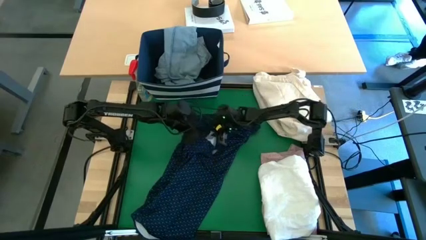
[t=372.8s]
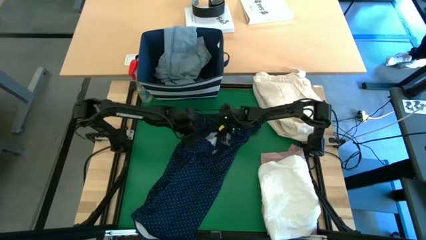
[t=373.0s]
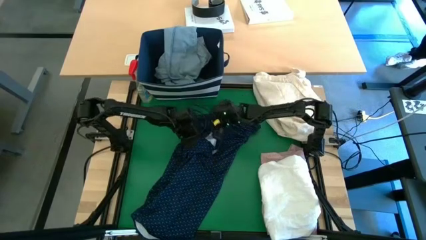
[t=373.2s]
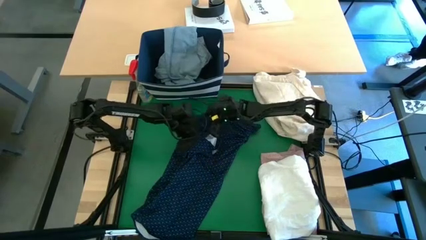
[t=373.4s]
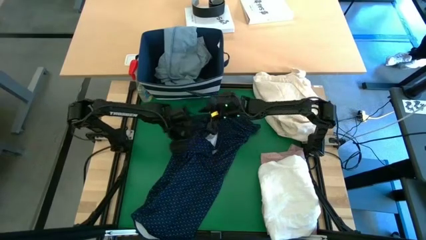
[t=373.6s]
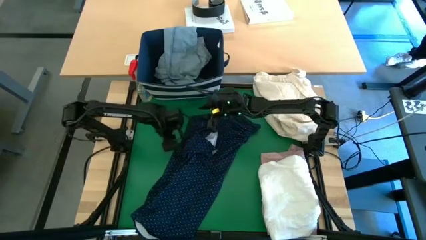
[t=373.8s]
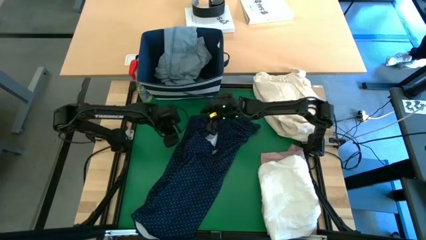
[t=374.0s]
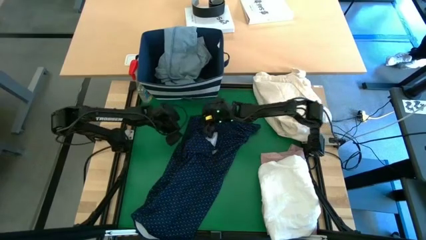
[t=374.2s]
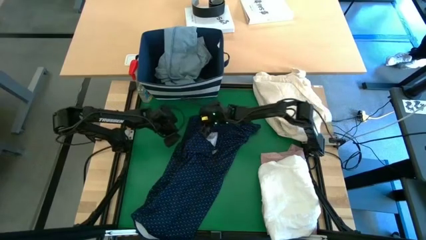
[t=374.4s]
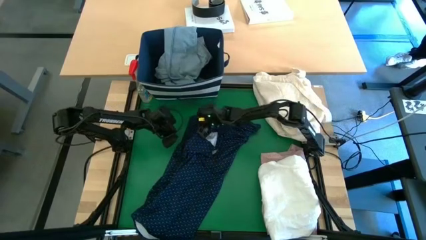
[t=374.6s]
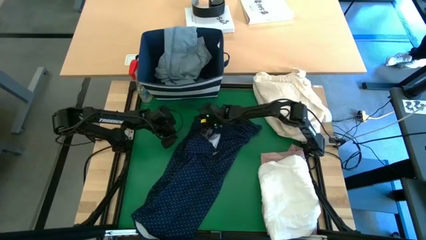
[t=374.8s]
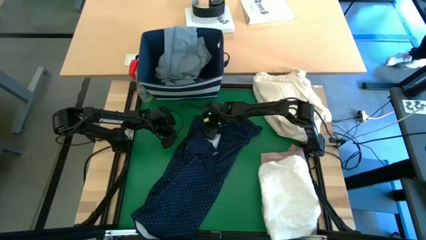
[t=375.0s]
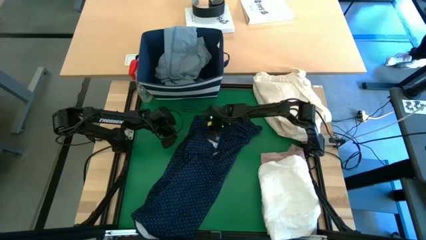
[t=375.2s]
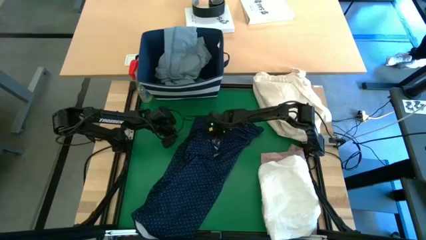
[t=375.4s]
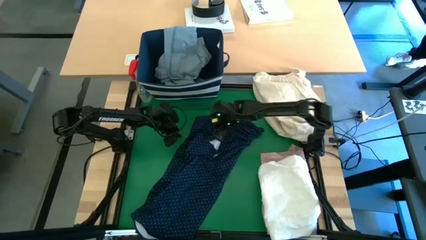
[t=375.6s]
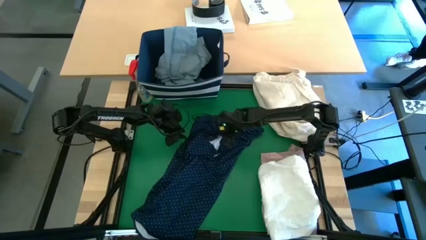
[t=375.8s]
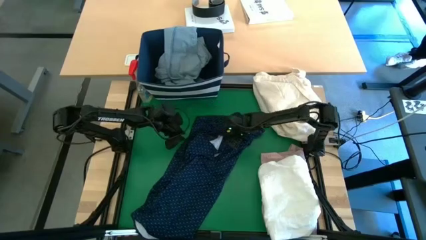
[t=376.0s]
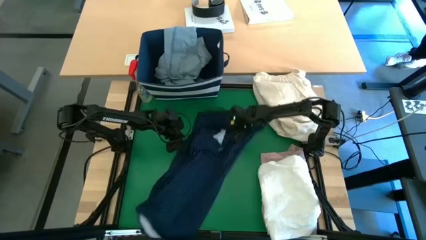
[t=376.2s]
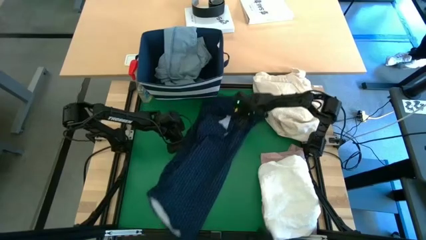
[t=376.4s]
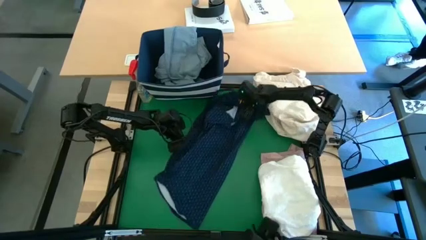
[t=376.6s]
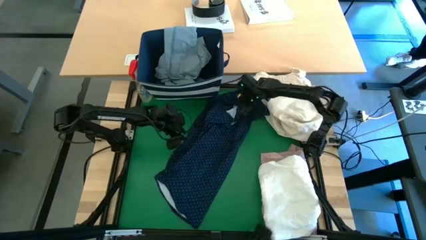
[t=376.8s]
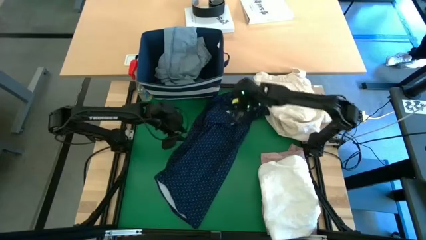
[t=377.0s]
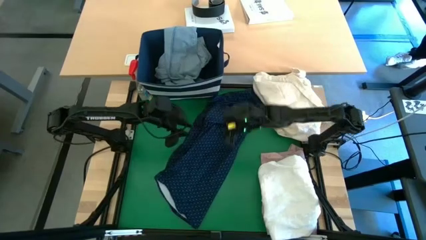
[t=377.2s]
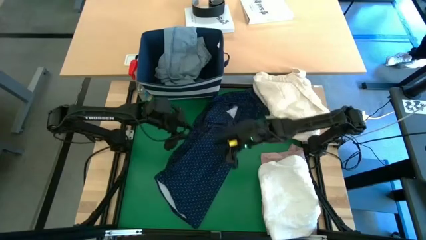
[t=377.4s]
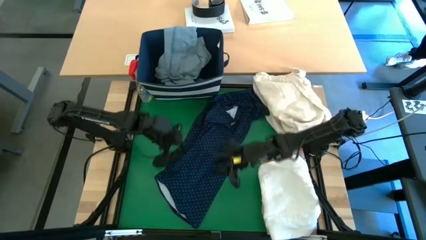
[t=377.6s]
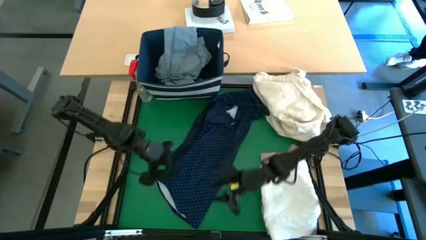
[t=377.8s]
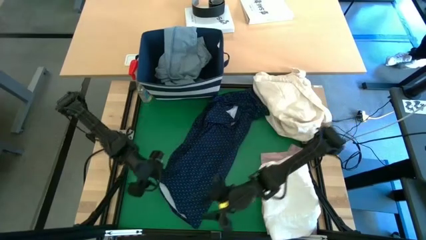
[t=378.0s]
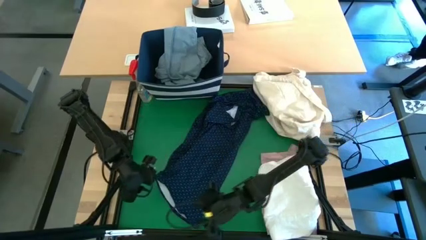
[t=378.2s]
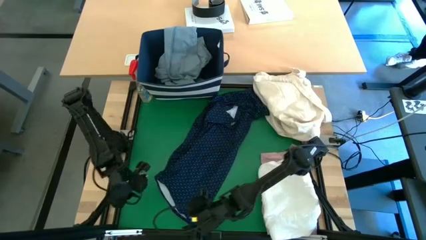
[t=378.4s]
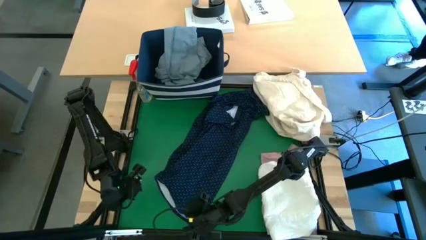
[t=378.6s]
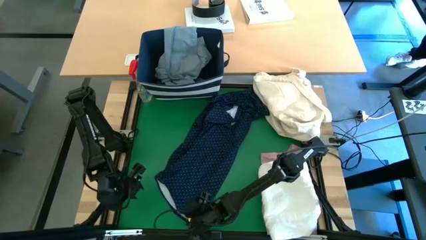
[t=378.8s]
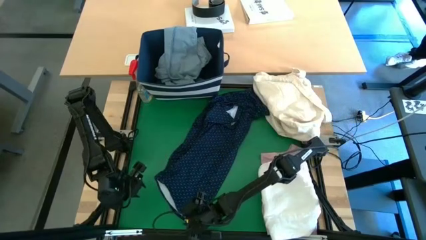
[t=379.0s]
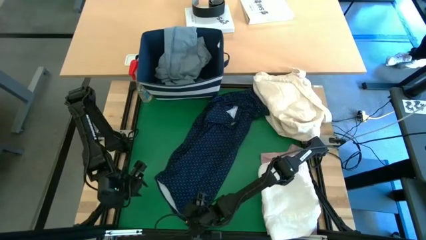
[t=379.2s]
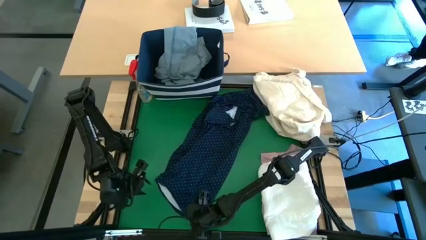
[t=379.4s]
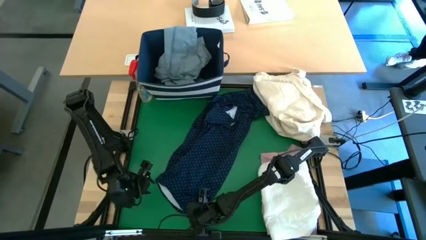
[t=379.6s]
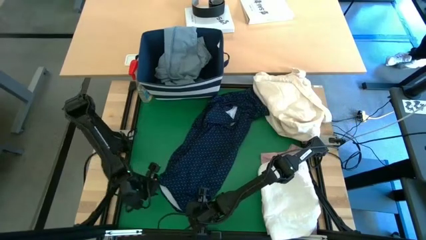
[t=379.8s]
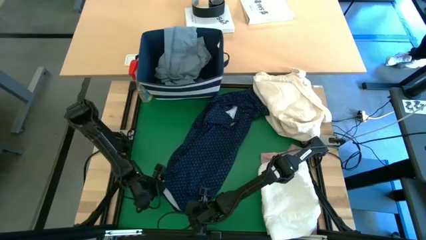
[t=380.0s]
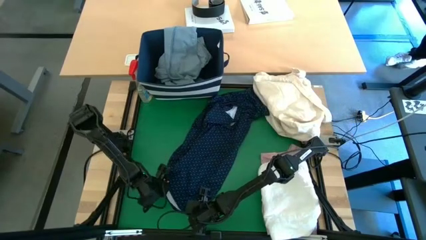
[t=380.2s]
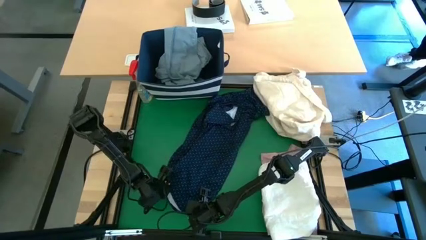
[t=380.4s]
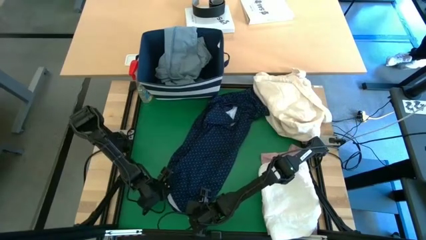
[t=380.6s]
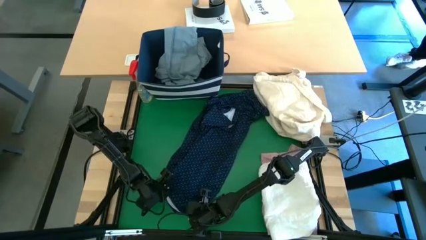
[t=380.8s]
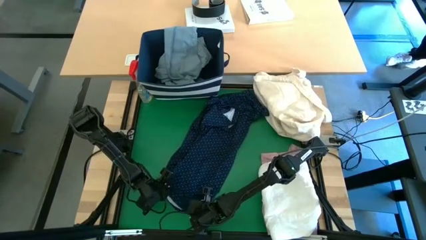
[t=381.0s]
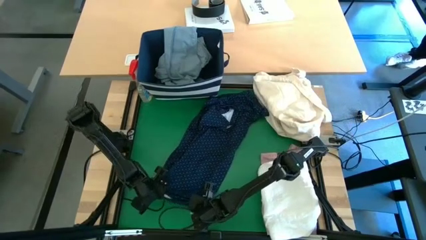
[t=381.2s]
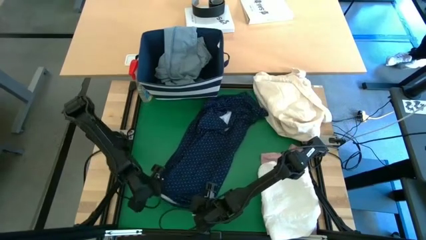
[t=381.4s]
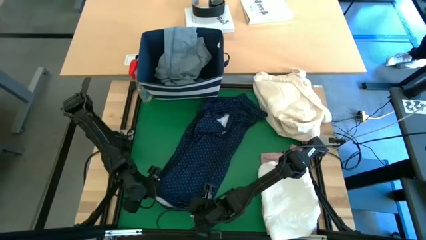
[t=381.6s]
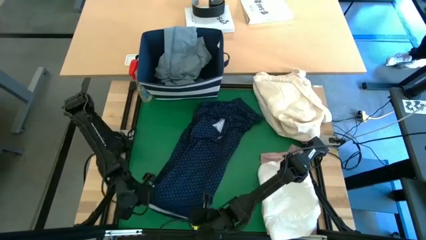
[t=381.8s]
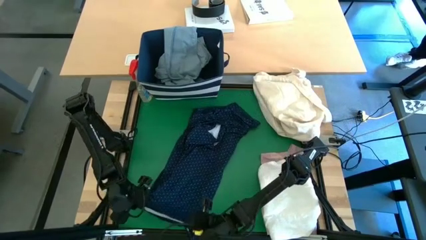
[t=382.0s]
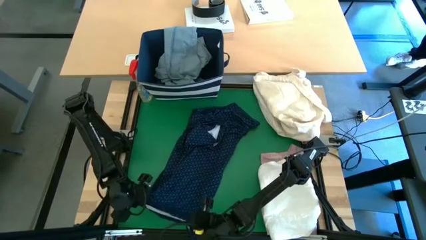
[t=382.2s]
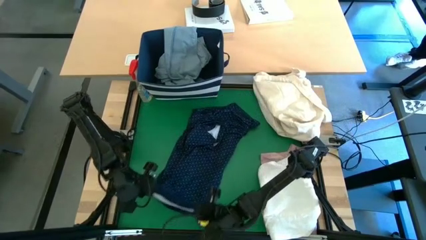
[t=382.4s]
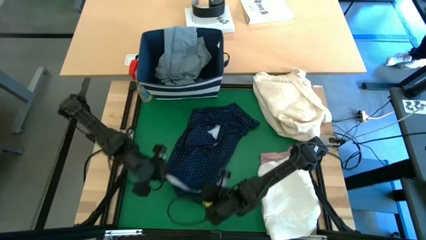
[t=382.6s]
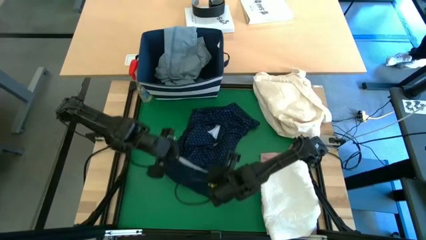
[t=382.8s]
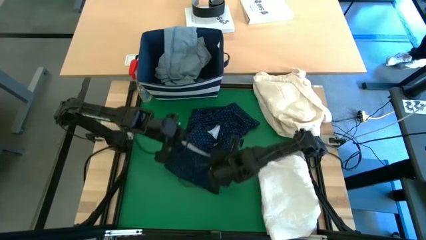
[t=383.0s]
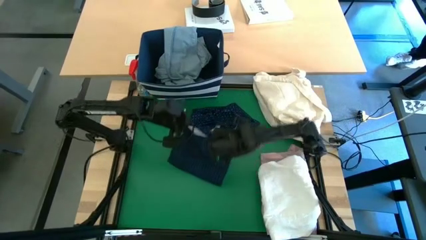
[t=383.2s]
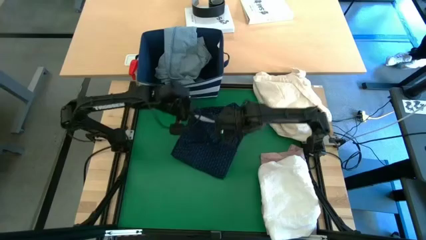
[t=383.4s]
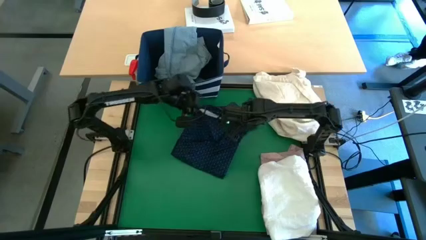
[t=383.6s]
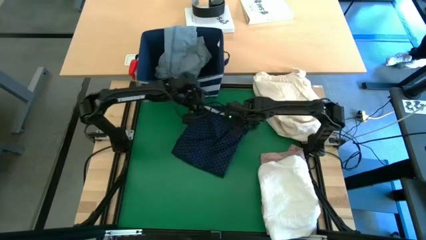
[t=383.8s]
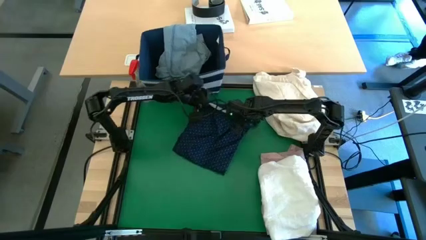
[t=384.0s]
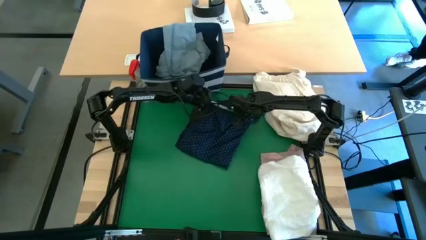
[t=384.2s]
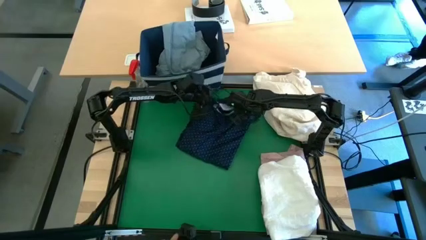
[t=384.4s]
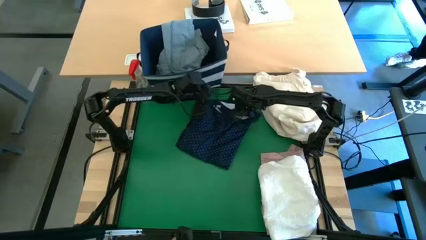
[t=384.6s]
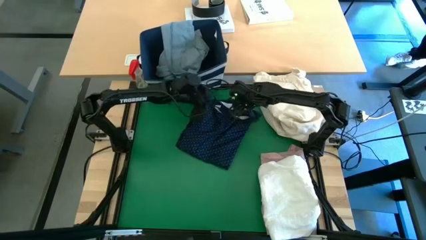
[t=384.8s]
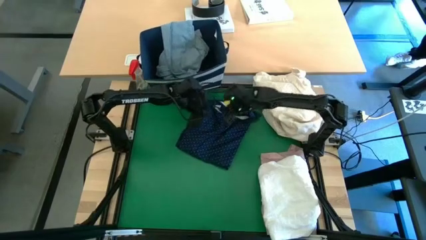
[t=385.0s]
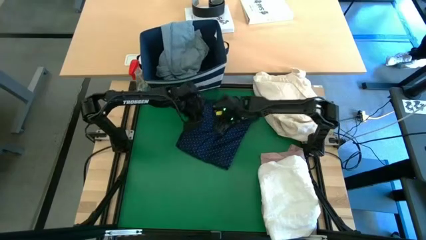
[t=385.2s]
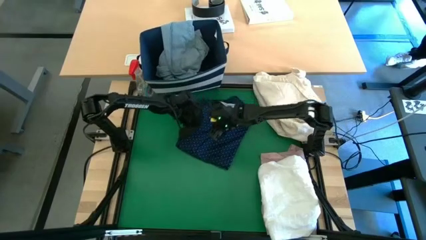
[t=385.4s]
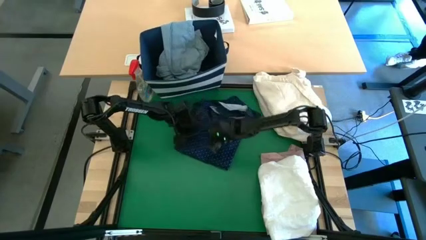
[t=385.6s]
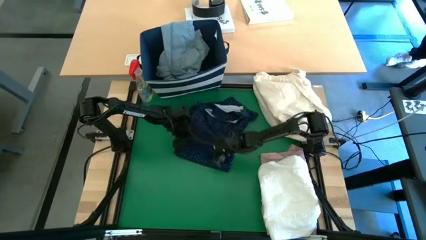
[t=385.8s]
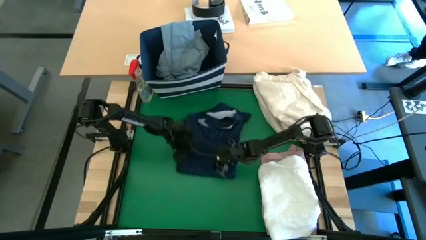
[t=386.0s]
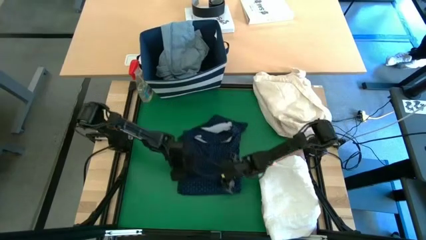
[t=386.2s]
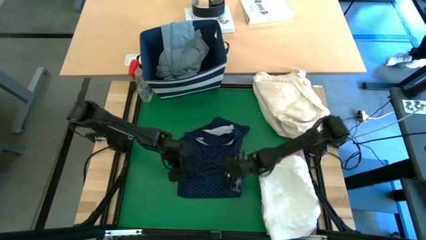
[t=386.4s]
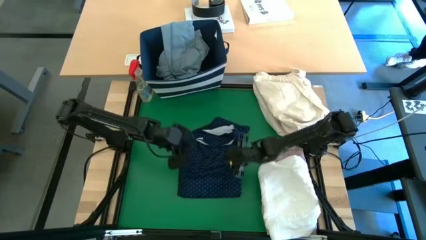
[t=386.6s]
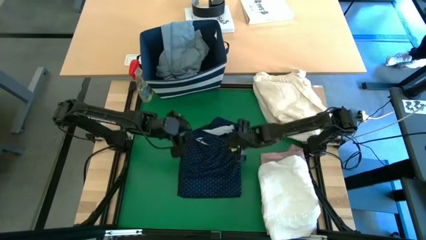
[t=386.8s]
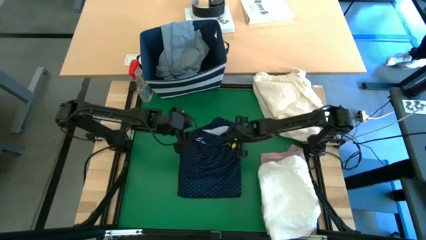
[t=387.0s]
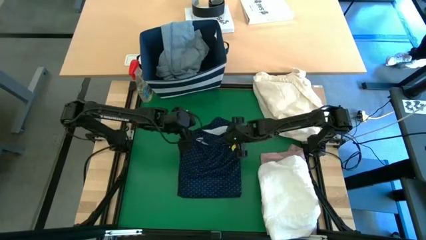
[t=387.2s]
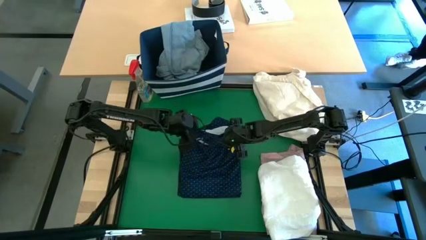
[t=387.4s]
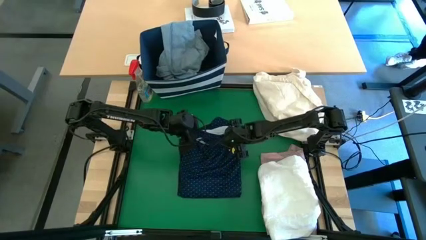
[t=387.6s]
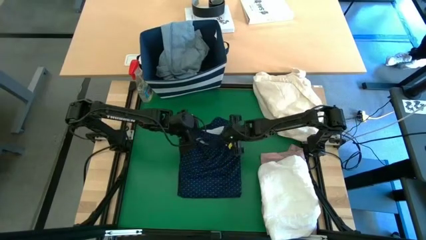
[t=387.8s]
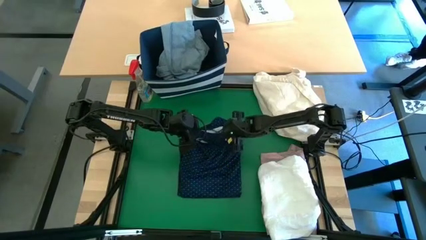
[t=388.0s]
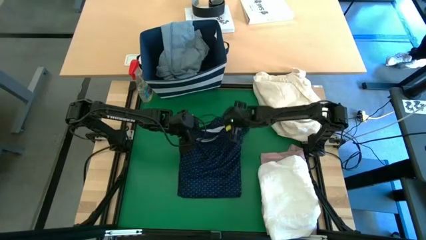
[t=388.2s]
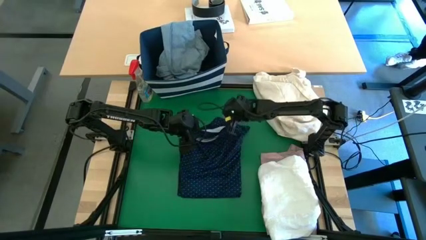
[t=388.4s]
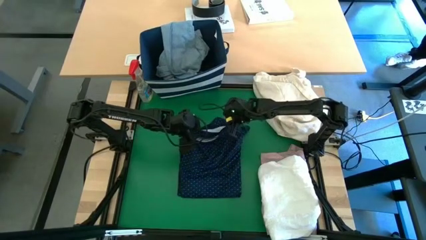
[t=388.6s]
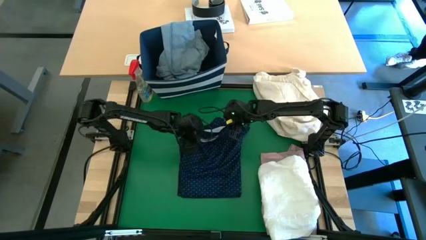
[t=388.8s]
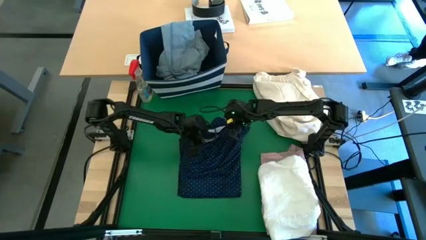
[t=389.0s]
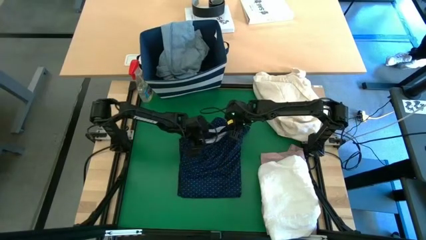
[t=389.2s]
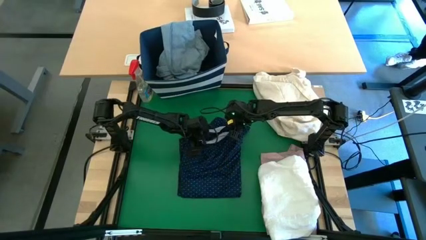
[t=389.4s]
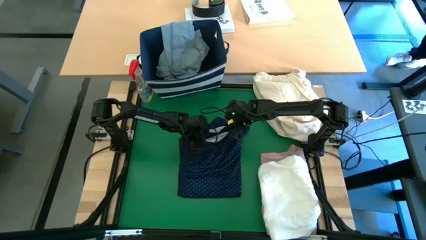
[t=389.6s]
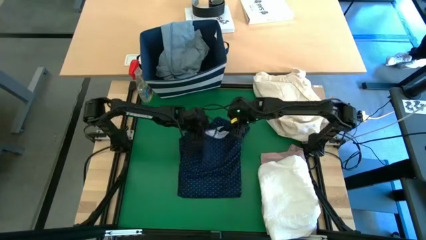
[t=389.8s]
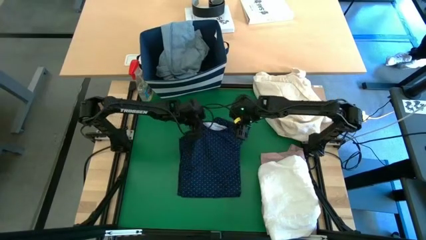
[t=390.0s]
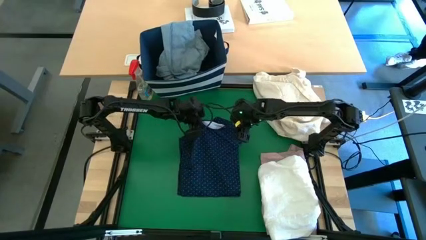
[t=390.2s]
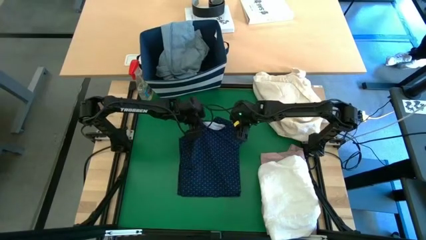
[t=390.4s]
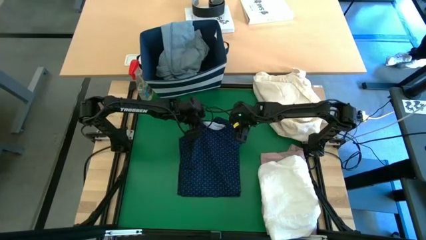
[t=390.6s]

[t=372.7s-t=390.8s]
Task: Fold laundry
Fold the blue polo shirt
